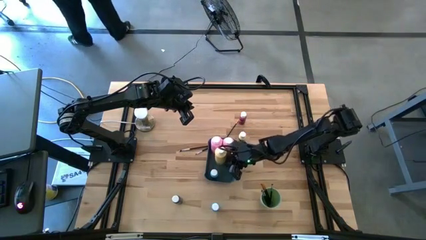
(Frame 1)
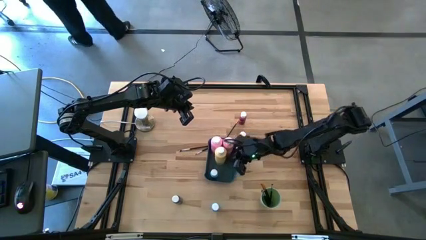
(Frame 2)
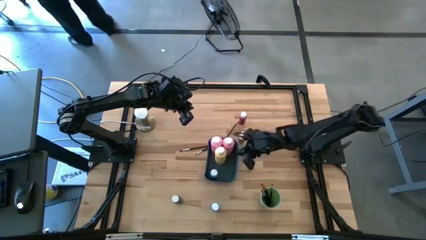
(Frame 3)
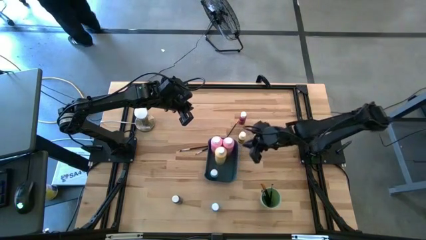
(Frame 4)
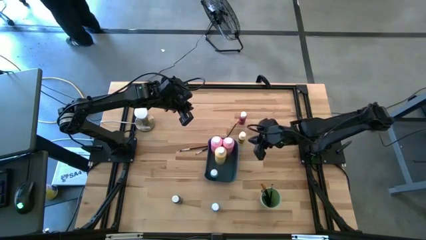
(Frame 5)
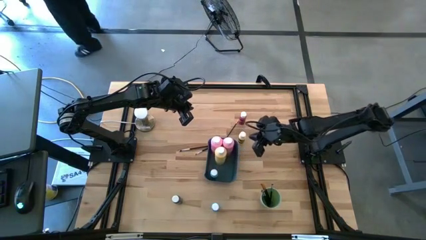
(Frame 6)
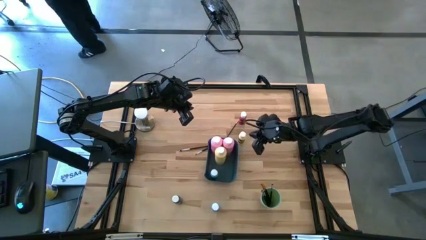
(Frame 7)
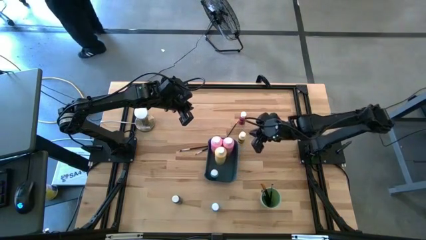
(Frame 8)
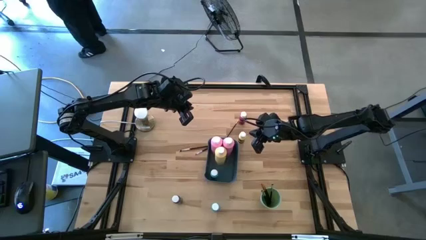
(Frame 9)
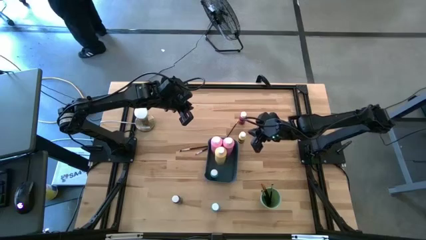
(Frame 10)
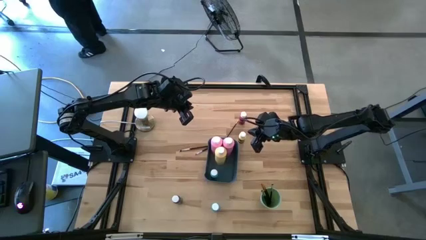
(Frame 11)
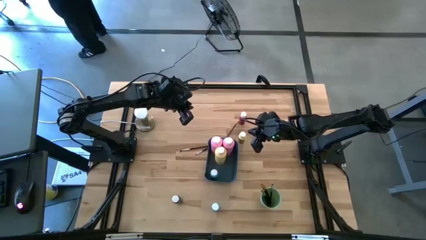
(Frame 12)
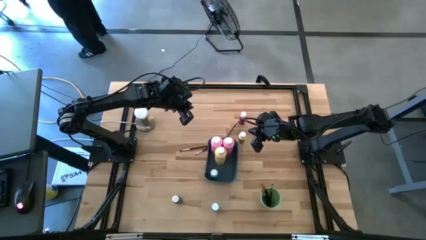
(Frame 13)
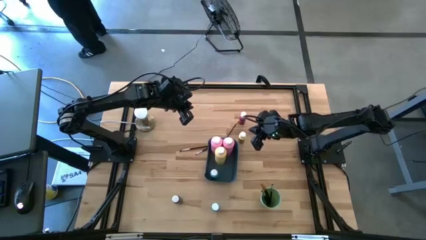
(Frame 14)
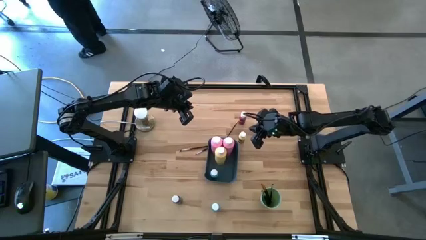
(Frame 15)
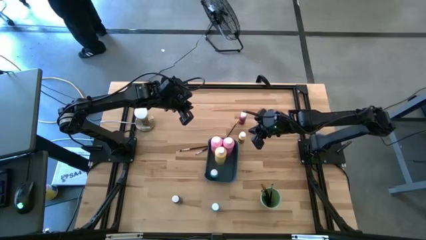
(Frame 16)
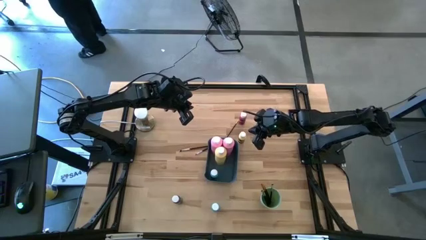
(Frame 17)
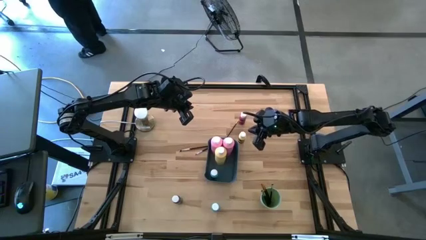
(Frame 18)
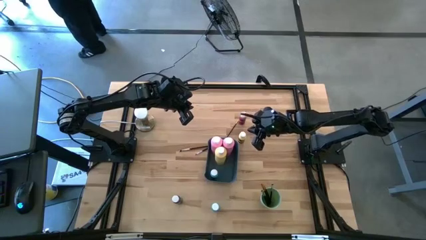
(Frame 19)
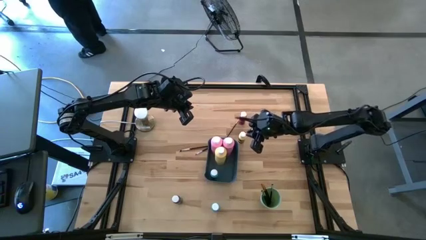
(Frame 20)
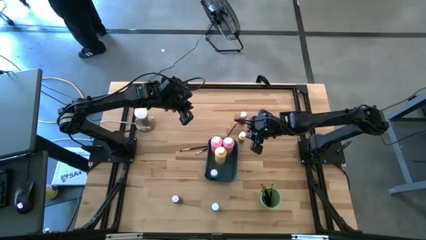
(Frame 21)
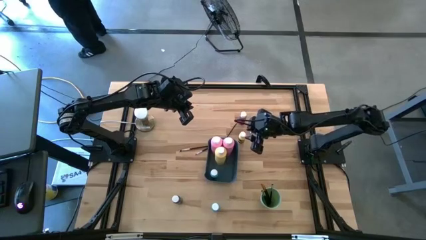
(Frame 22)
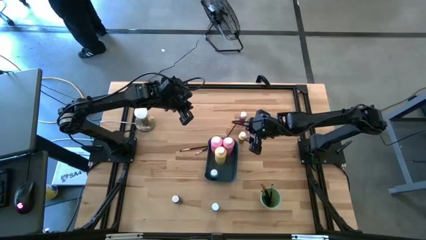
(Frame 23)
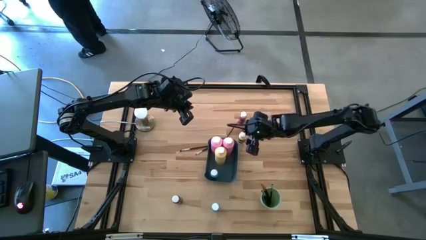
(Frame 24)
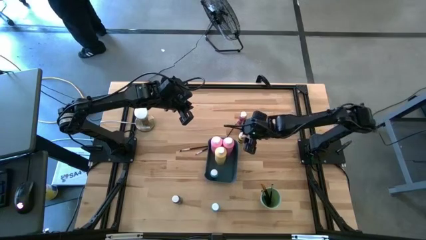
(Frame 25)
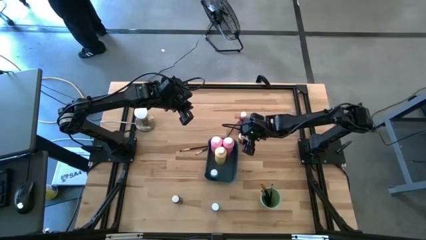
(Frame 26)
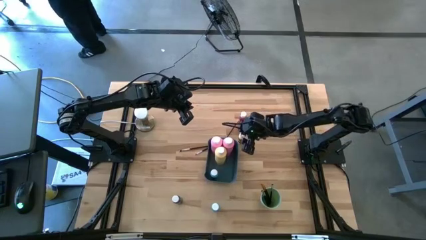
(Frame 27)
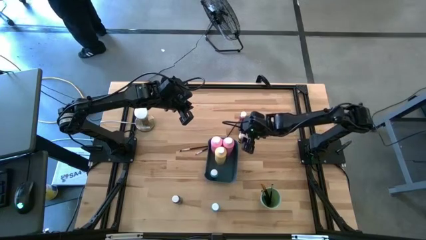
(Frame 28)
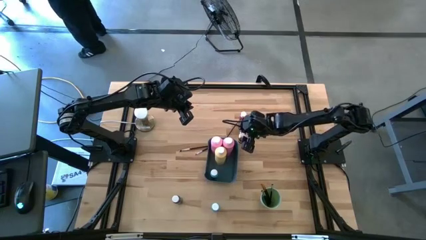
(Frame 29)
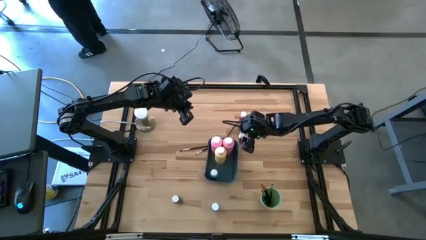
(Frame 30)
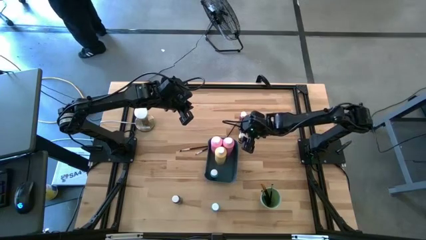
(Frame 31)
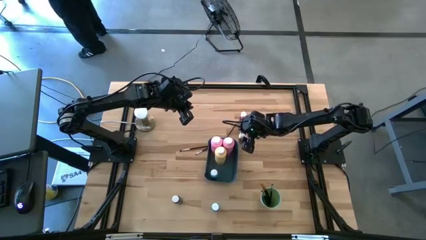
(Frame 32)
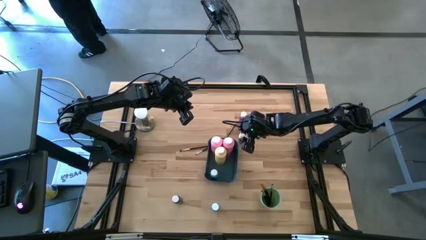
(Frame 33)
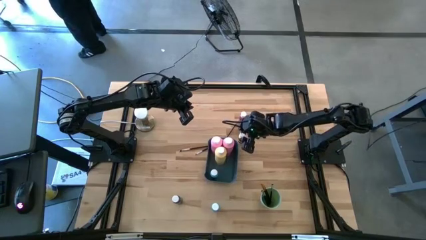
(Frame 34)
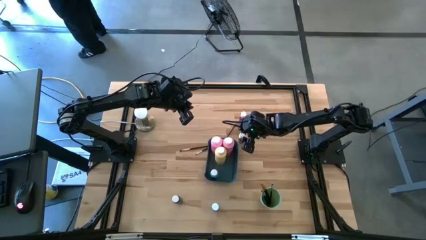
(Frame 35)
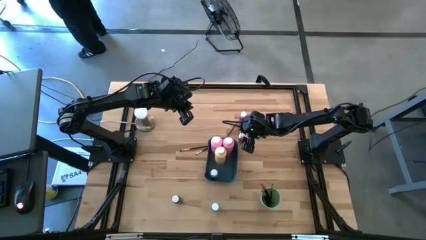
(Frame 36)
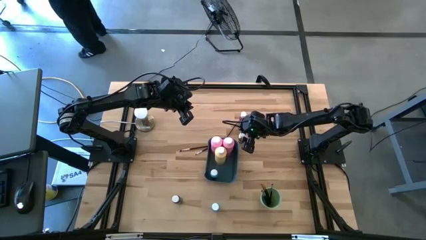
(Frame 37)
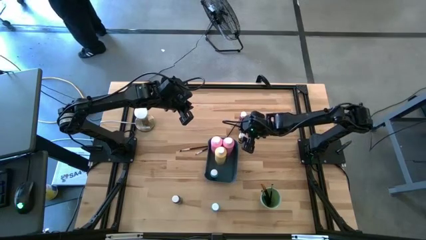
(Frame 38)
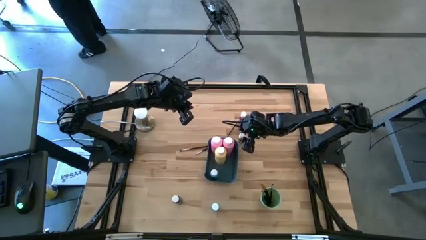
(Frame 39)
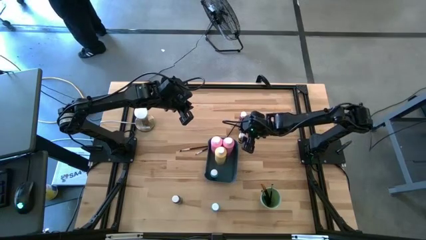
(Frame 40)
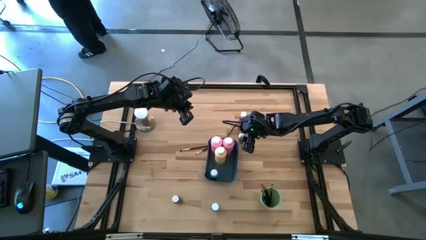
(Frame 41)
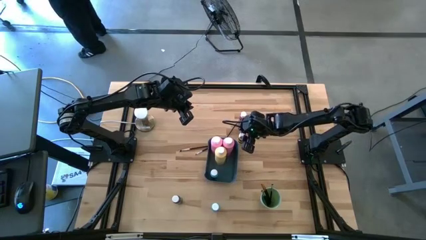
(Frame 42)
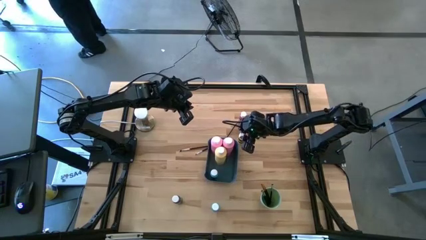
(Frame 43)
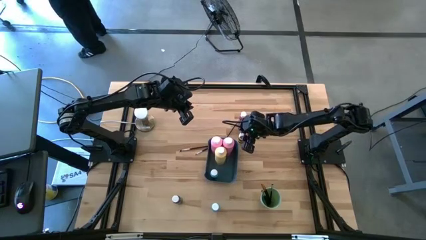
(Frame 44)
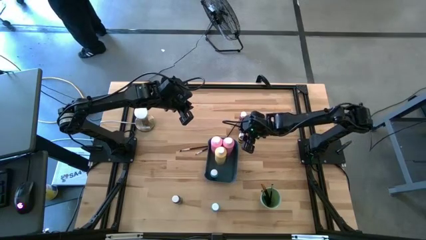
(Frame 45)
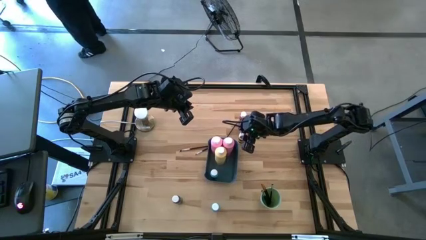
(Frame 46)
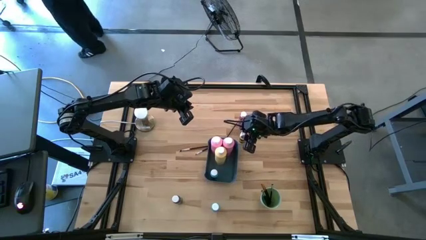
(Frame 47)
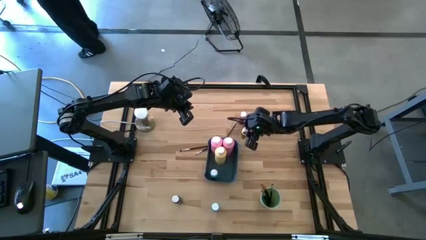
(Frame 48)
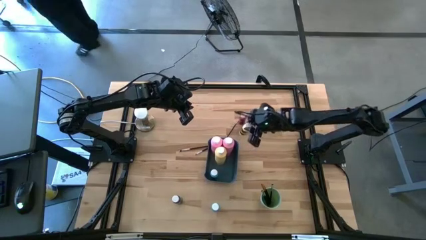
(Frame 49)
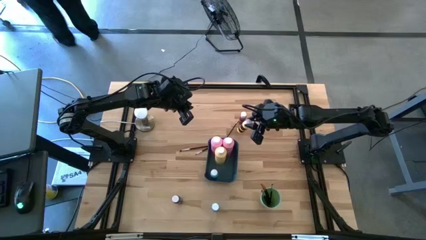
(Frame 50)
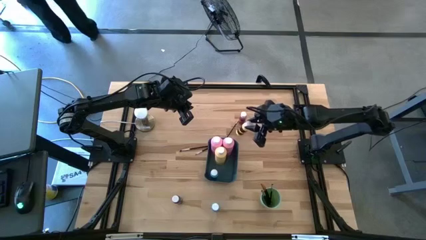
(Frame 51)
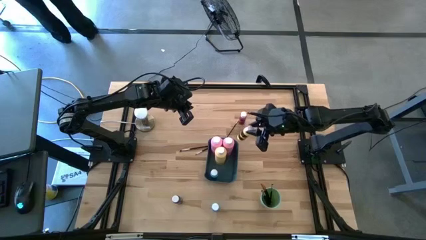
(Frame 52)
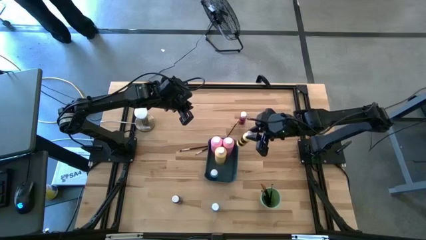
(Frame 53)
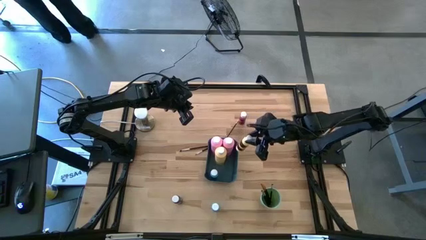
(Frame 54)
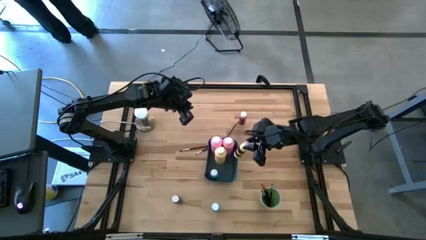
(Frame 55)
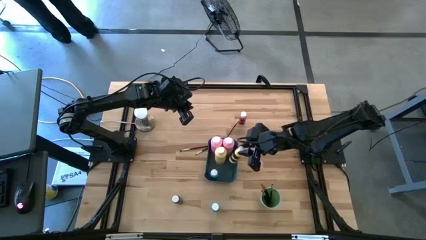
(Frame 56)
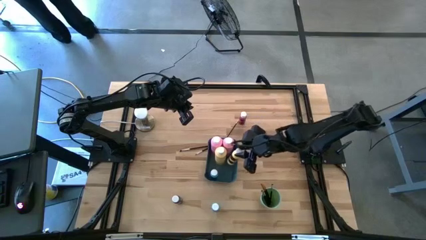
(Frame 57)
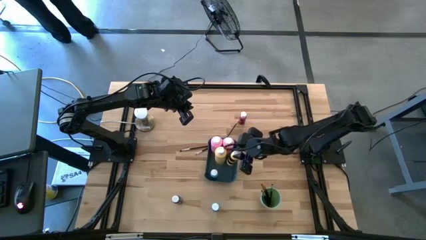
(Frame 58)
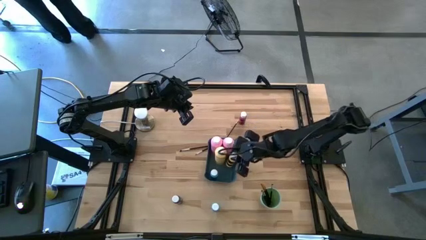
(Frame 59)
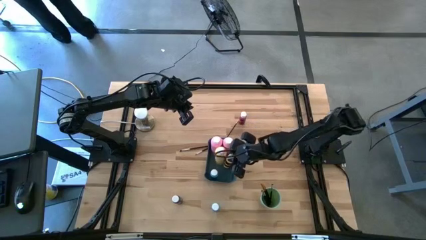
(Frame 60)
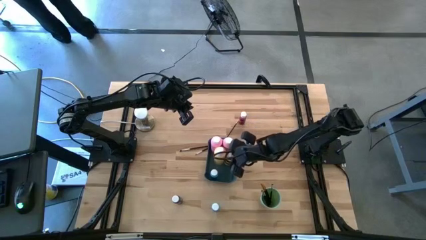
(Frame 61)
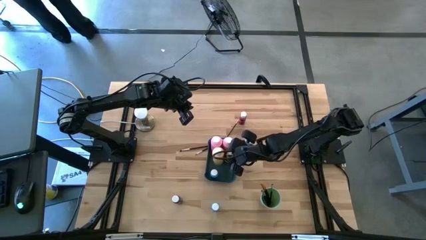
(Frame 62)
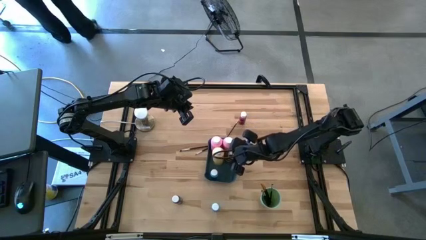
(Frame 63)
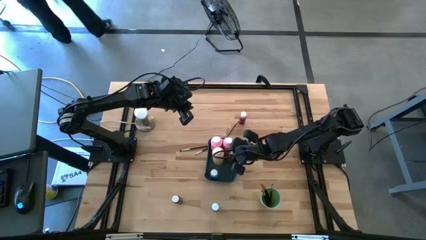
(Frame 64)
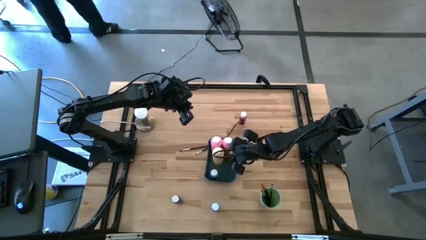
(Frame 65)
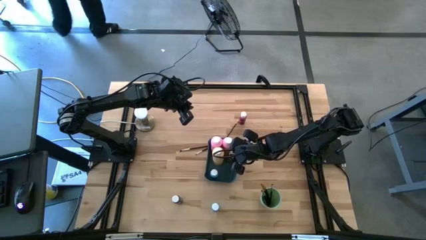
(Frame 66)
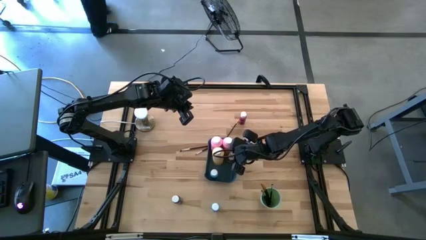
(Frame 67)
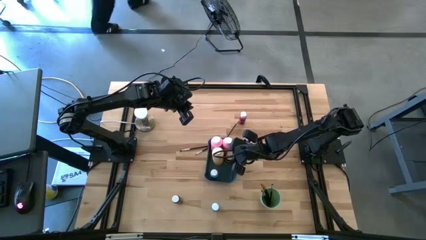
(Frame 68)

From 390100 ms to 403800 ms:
Task: Pick & Place Paint Supplies
Put the small yellow and black paint bottle into the blue bin

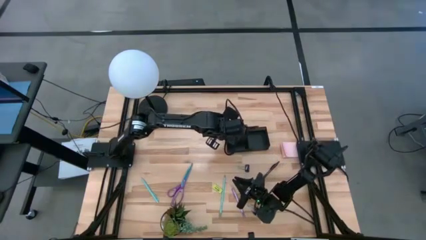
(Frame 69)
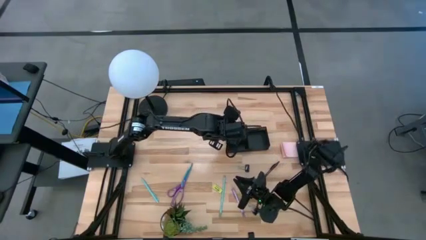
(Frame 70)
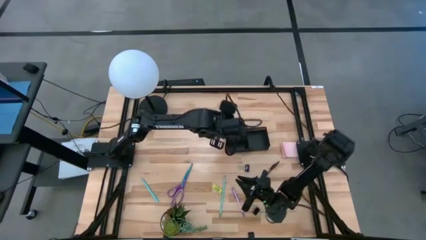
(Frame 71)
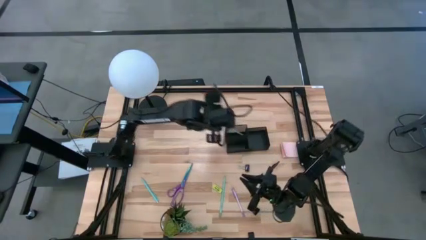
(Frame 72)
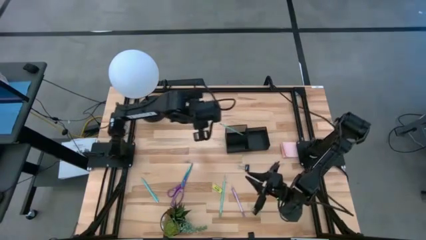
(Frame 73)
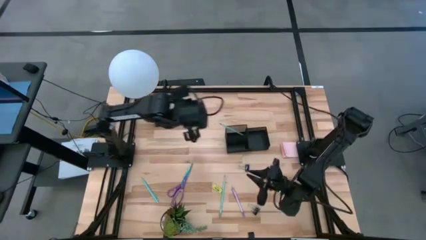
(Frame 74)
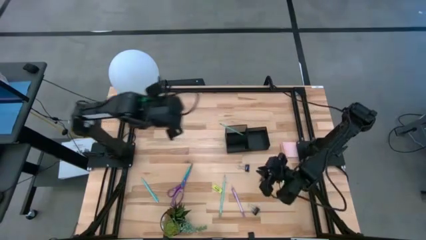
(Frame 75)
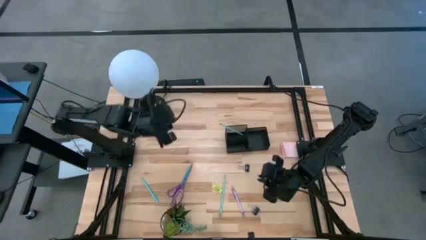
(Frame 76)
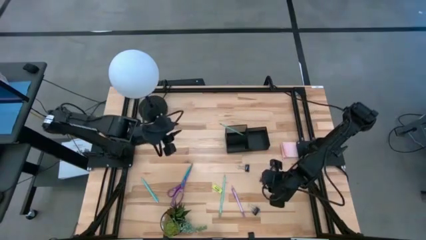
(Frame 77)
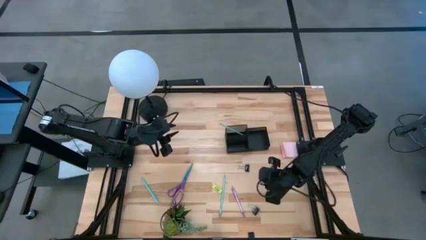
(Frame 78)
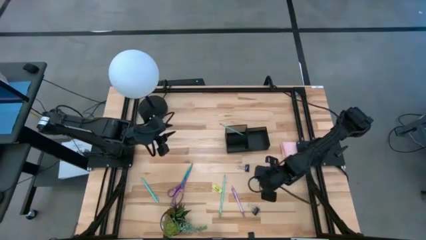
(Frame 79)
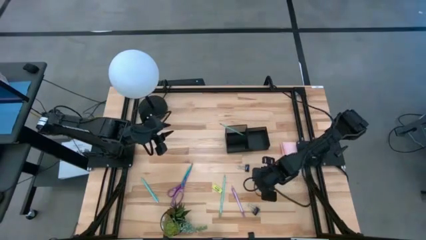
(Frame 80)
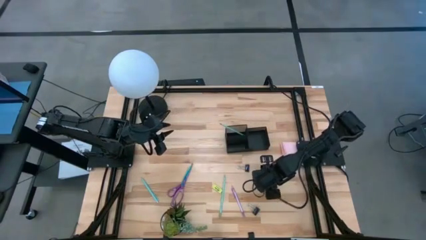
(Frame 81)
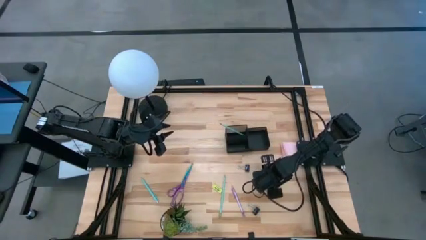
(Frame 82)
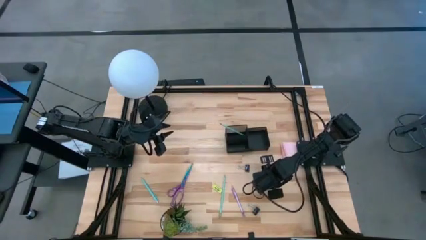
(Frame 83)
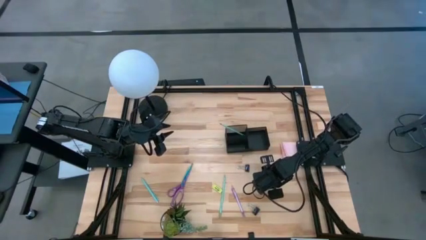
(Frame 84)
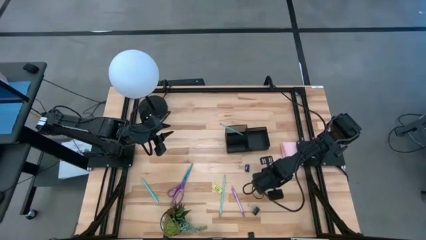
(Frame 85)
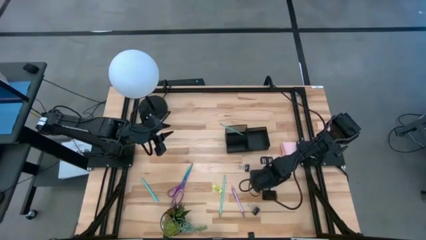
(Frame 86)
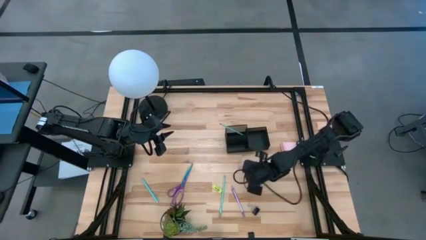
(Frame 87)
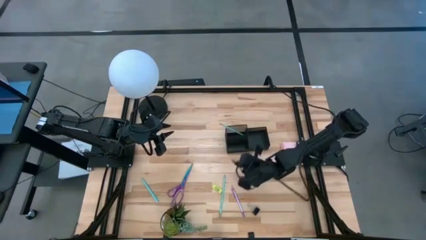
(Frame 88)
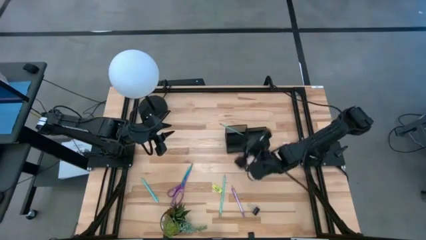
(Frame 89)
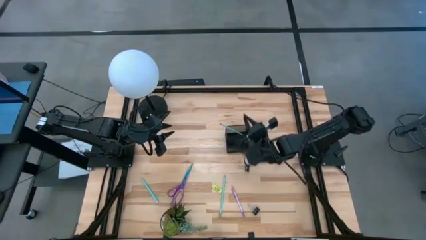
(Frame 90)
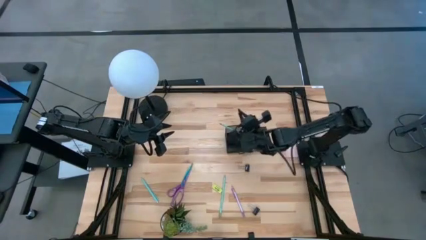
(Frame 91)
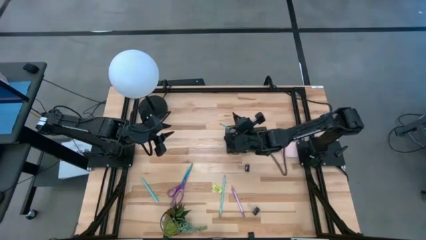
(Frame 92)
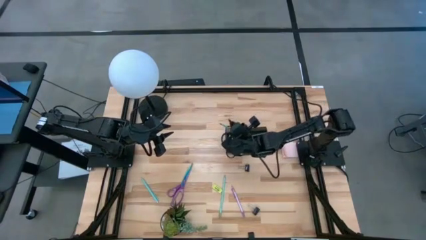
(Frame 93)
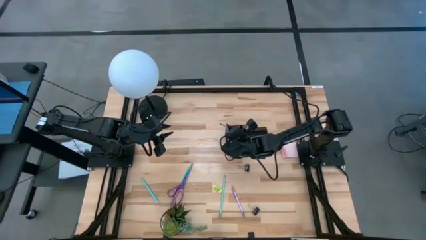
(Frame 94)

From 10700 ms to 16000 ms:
Task: Pick and place office supplies into organizer
Put the brown pen into the black desk organizer
